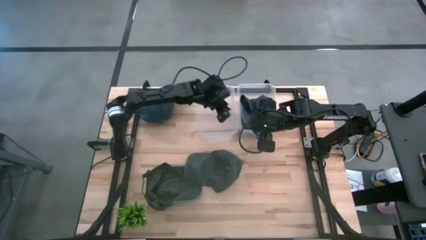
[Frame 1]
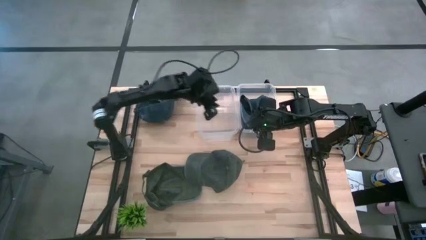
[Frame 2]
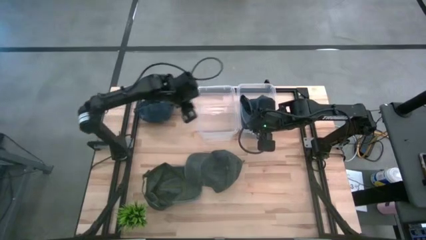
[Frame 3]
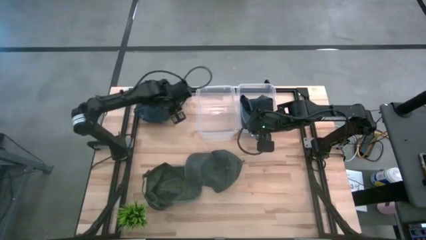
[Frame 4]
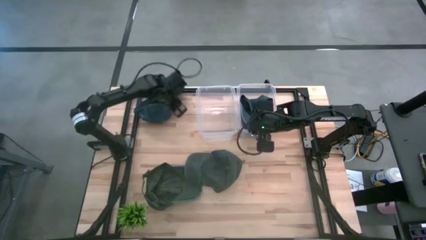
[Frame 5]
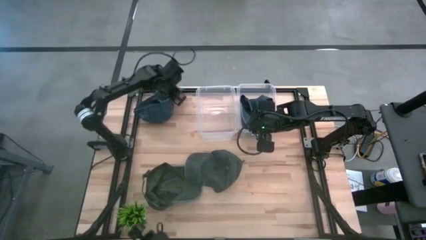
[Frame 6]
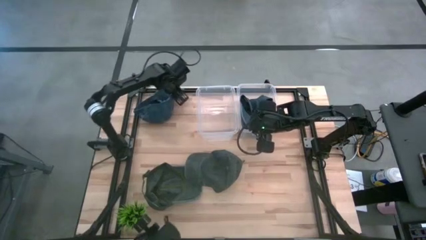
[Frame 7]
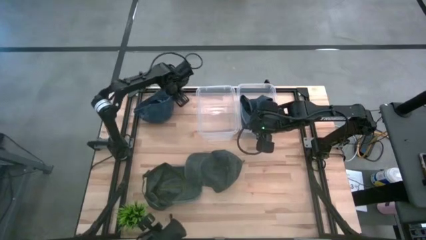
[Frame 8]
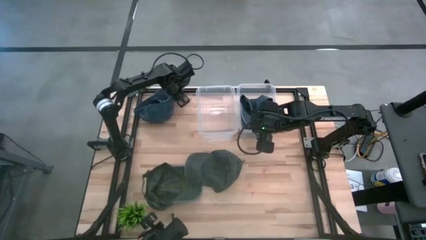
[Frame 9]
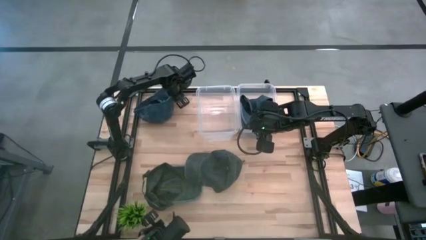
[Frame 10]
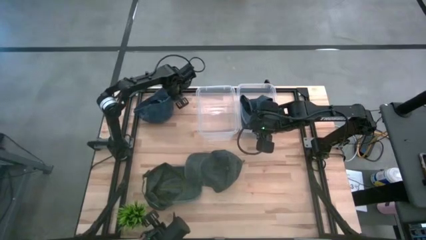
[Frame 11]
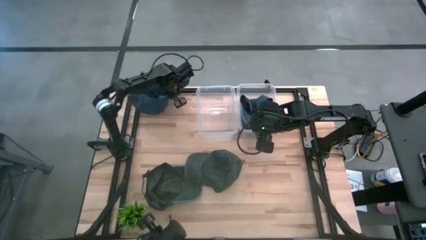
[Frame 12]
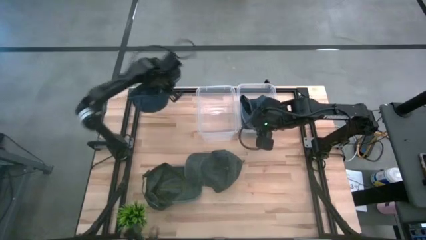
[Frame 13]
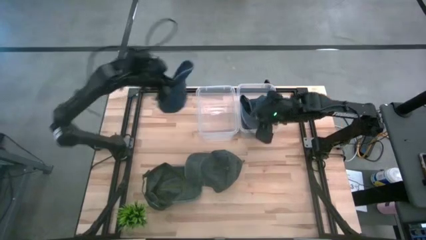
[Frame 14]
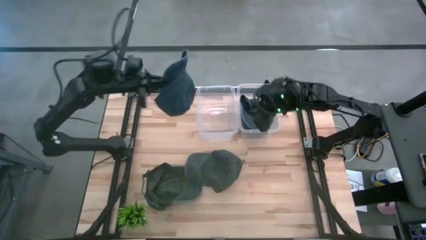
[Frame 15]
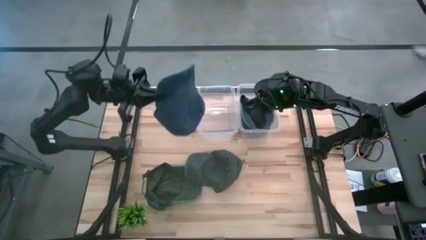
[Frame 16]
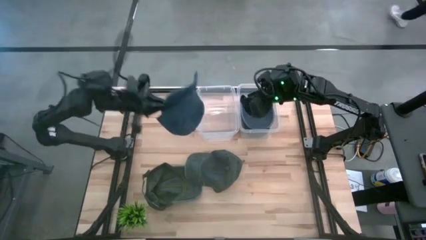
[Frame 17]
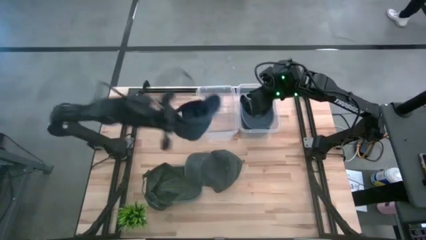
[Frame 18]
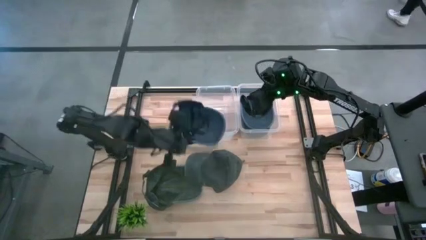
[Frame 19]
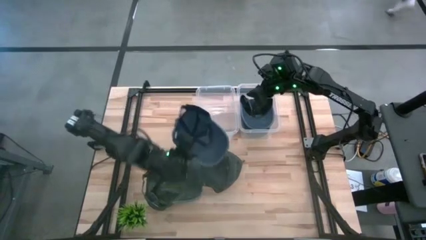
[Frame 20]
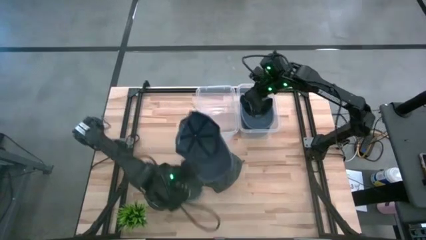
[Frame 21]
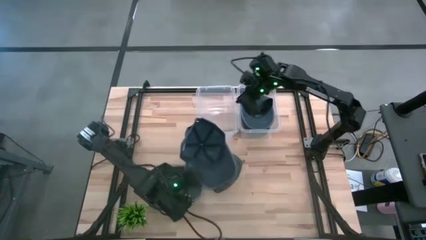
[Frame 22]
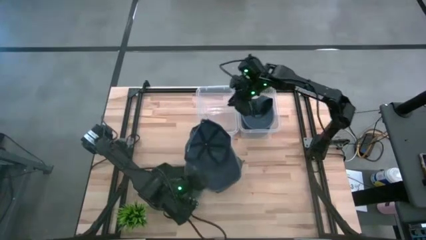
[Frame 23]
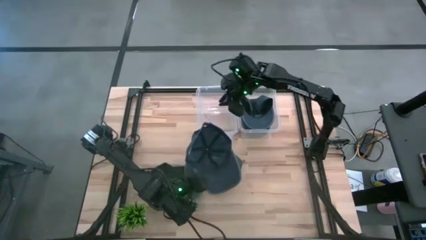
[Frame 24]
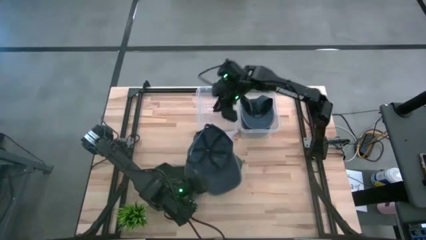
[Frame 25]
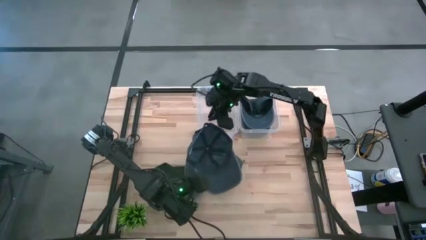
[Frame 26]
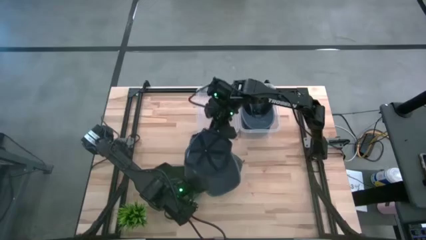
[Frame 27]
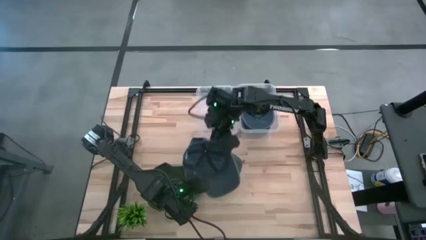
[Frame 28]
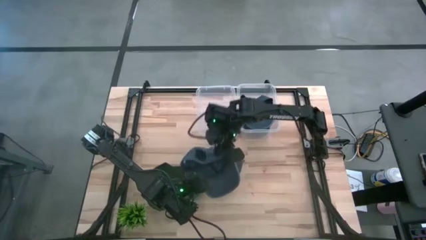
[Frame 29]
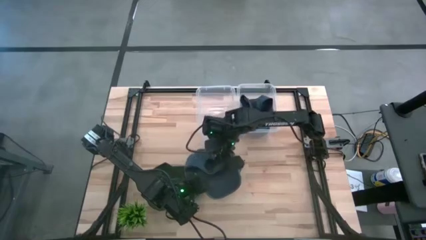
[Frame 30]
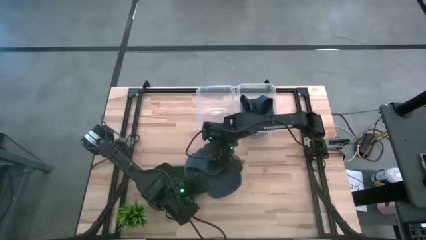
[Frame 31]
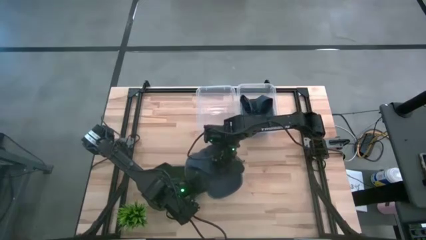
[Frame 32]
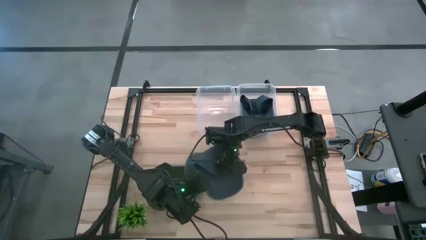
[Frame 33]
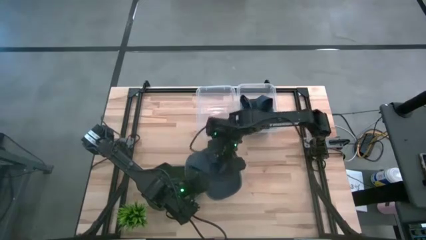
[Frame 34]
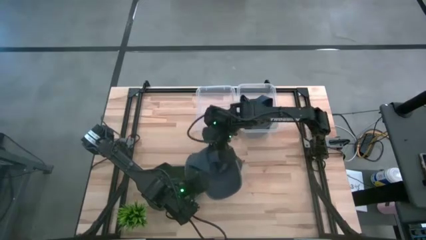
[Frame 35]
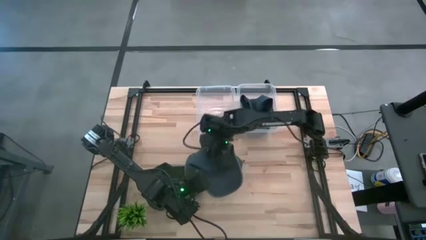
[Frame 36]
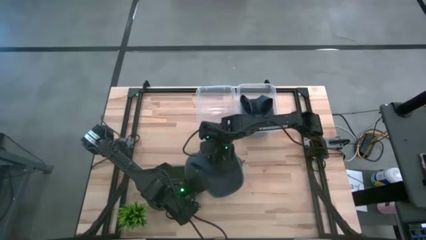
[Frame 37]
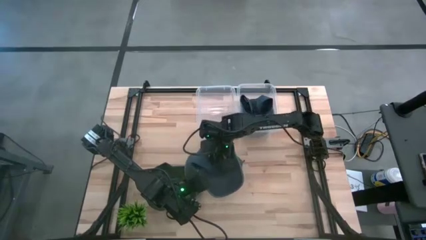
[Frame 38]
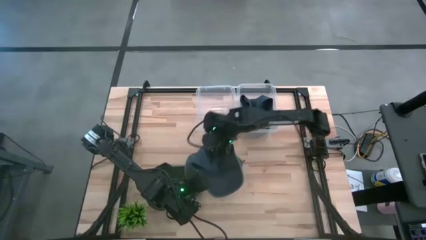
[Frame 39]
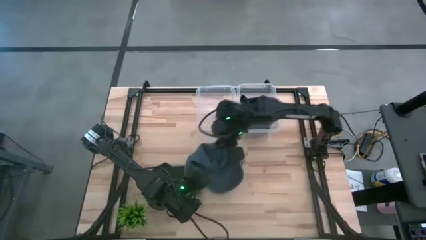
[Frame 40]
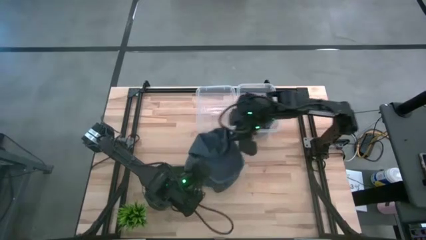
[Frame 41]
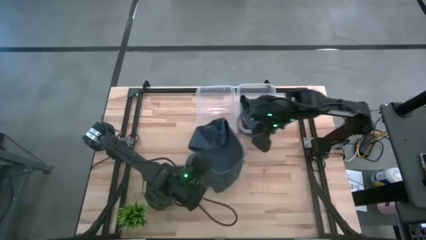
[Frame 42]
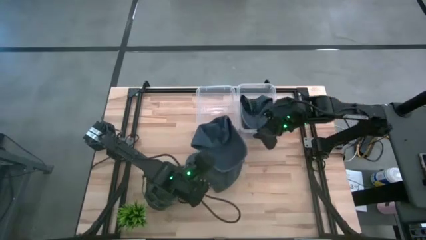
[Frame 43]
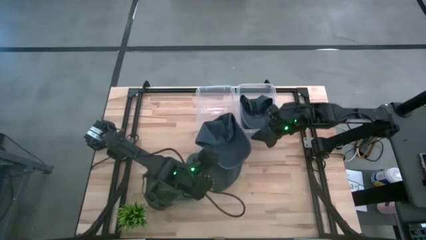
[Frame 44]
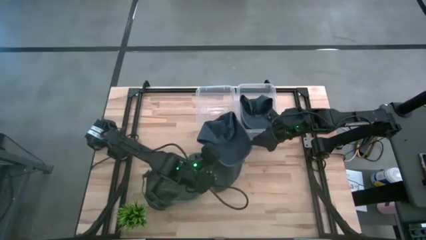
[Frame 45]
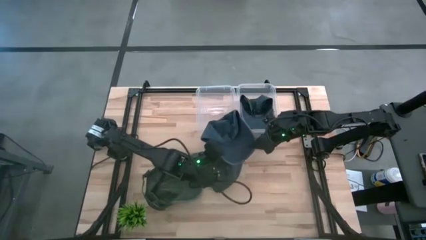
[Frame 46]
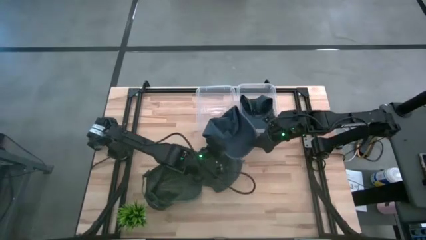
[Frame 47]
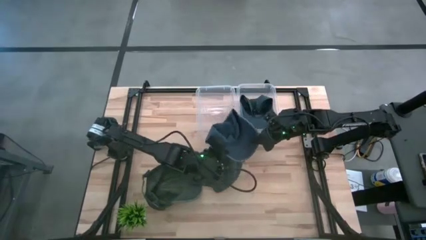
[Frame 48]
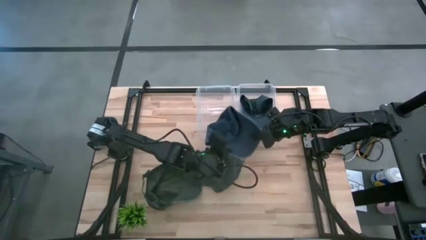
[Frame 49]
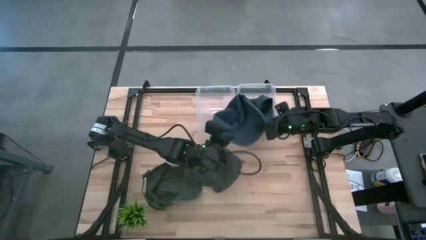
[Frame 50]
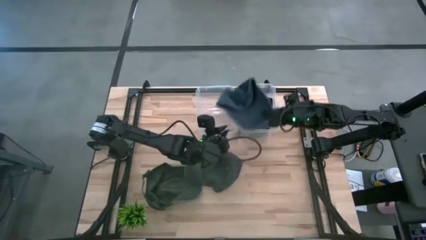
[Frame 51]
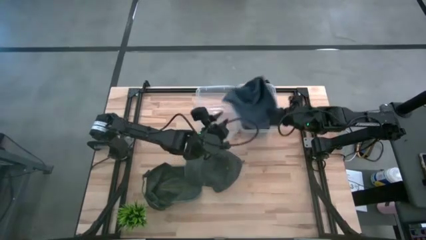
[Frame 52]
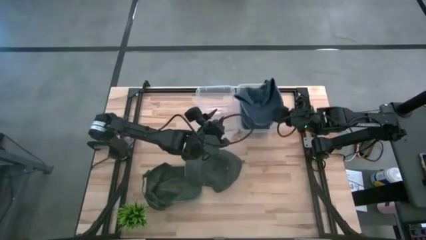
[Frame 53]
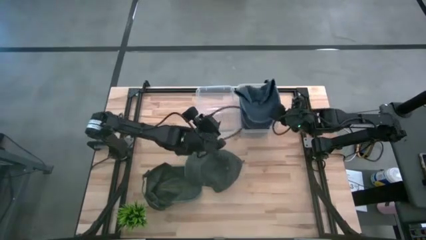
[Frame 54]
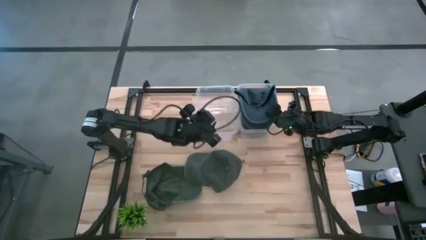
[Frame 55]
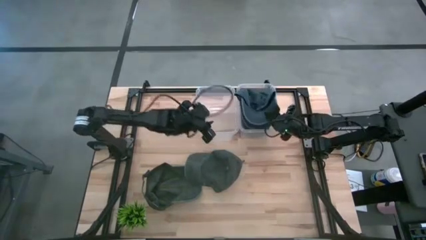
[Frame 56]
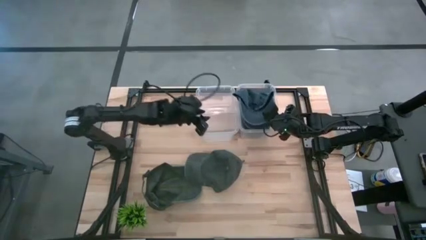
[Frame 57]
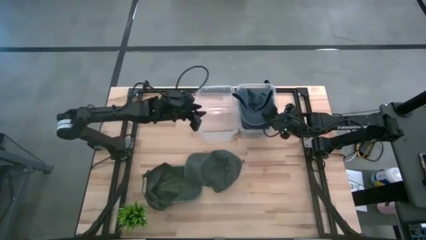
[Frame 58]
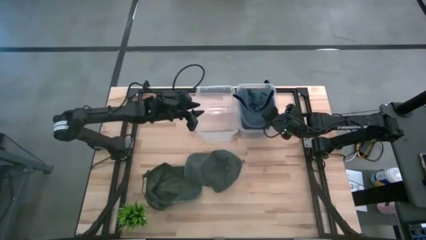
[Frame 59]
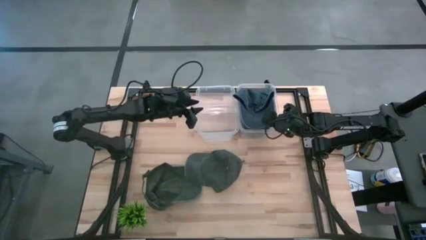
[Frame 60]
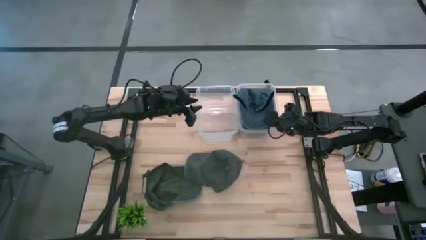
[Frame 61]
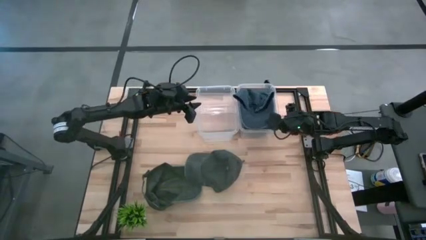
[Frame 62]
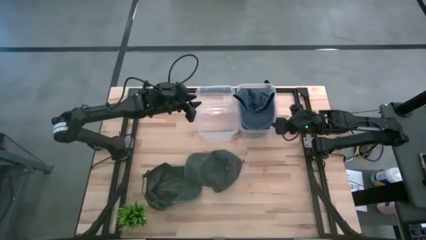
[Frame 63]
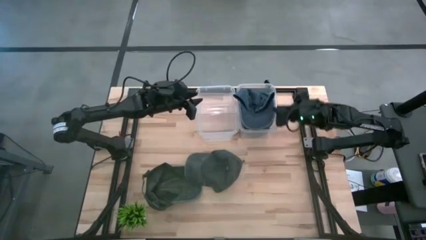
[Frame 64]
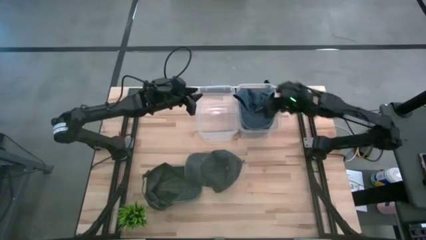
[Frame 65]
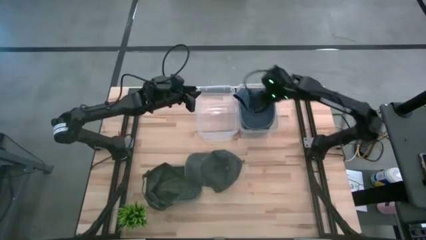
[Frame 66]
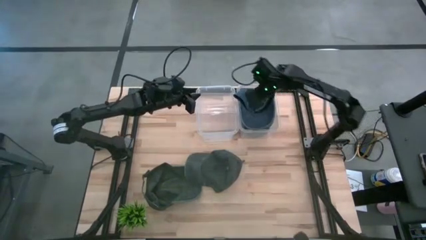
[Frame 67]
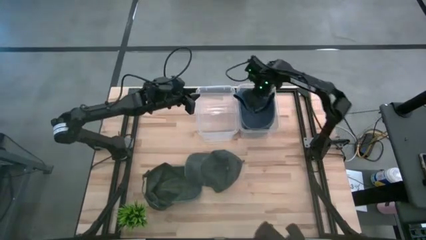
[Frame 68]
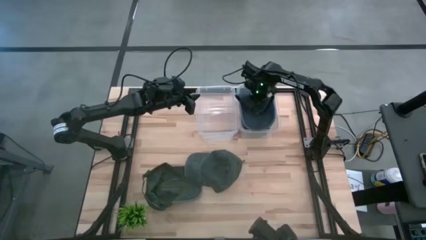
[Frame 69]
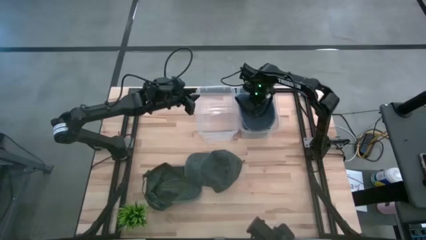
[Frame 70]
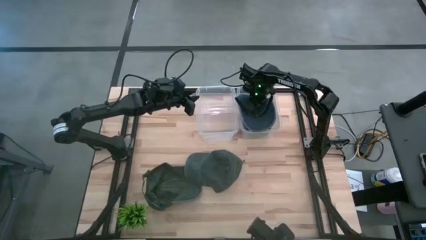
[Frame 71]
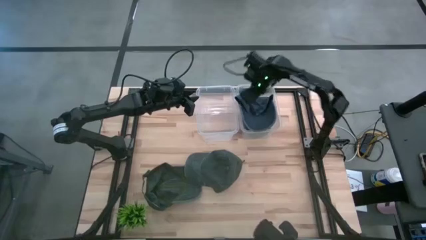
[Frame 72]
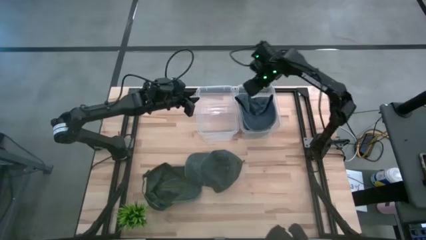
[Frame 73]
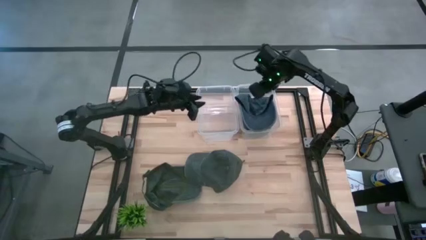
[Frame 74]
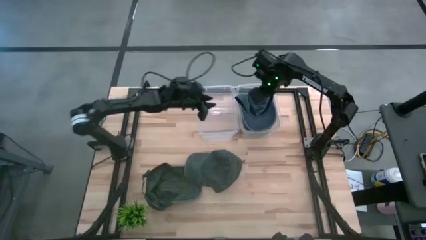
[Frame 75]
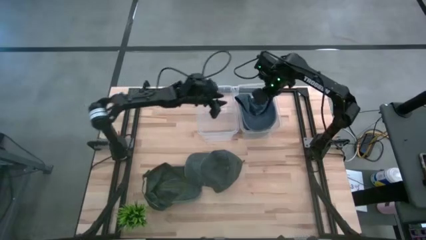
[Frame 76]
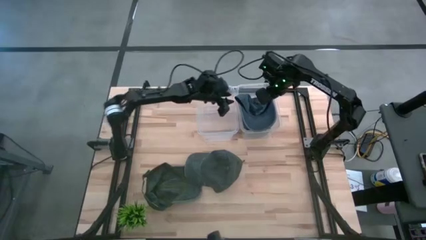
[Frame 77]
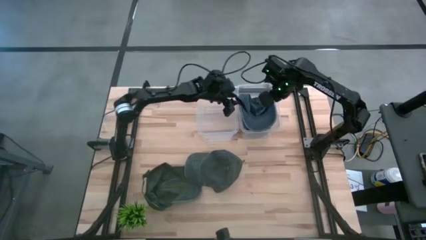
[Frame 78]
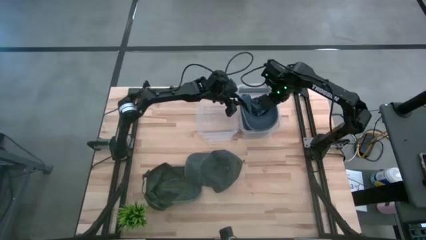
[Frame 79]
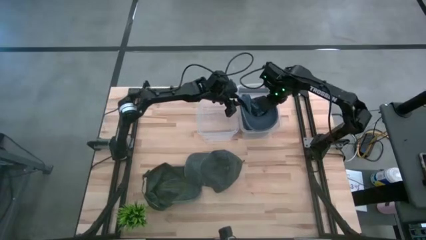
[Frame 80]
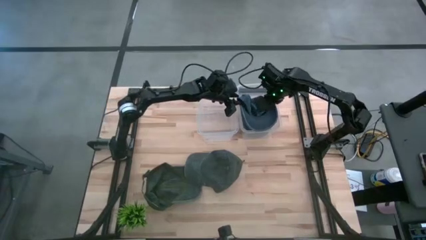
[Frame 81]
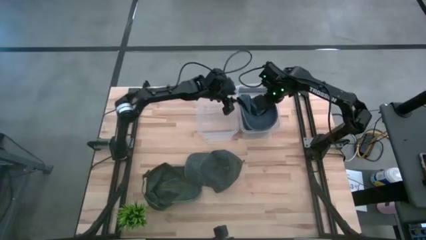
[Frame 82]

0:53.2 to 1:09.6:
Task: Pick & Place hat
Put the blue cap into the right transparent bin
